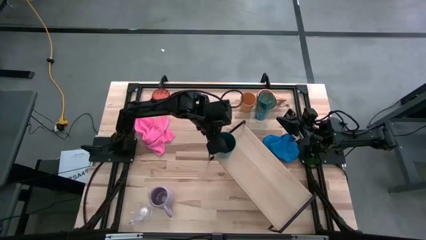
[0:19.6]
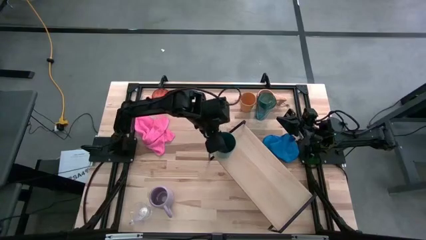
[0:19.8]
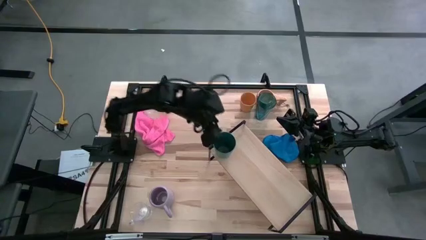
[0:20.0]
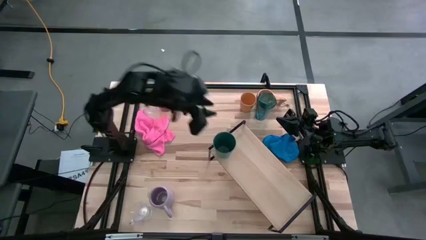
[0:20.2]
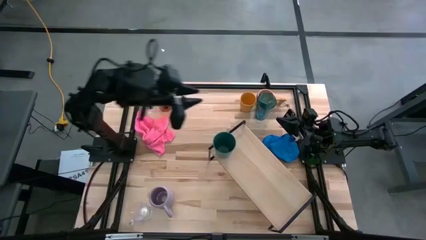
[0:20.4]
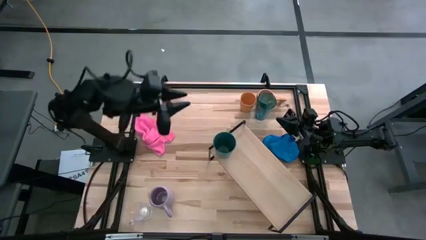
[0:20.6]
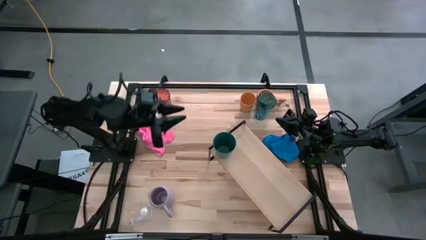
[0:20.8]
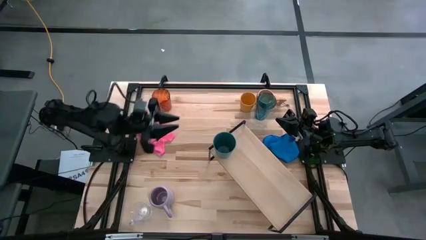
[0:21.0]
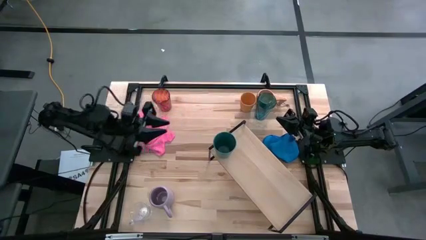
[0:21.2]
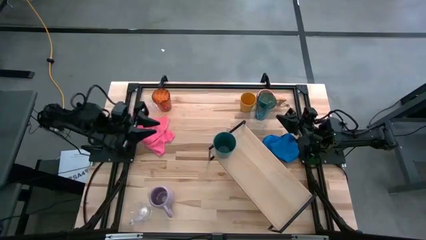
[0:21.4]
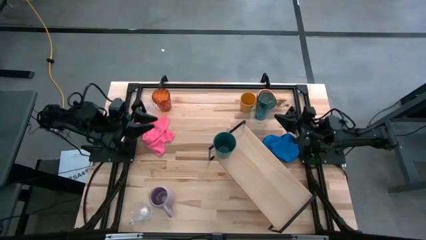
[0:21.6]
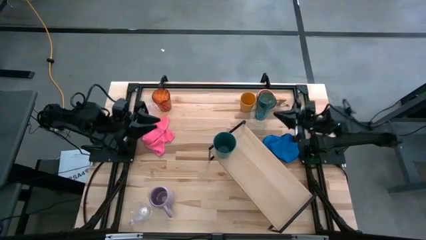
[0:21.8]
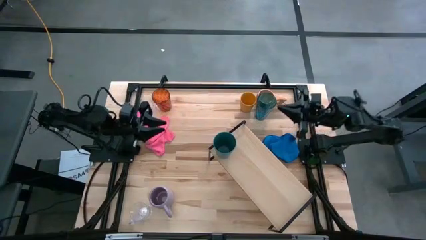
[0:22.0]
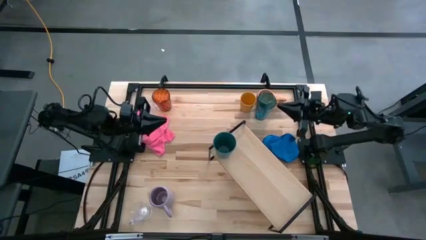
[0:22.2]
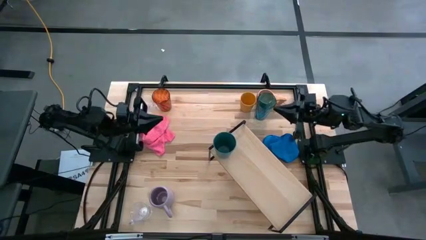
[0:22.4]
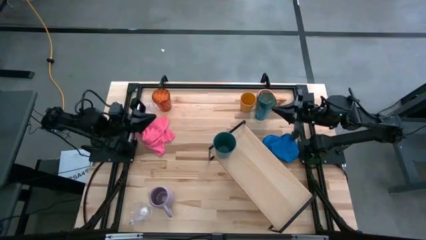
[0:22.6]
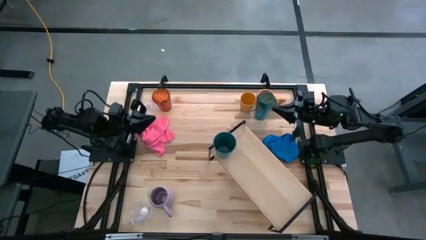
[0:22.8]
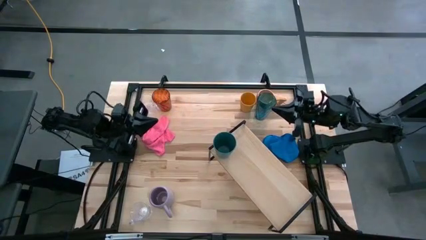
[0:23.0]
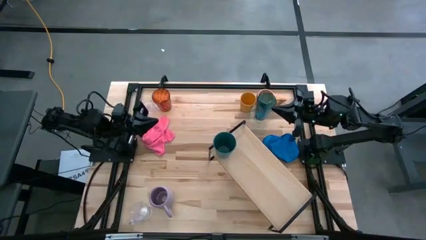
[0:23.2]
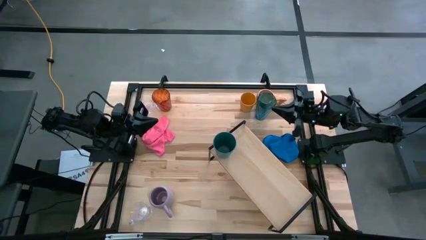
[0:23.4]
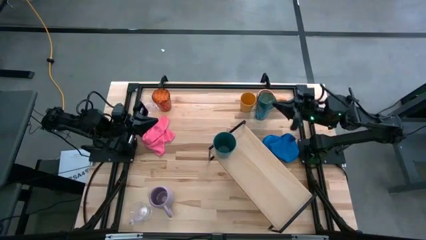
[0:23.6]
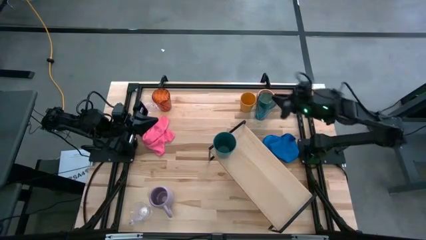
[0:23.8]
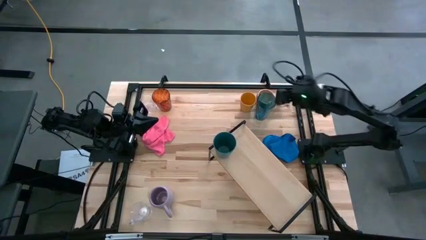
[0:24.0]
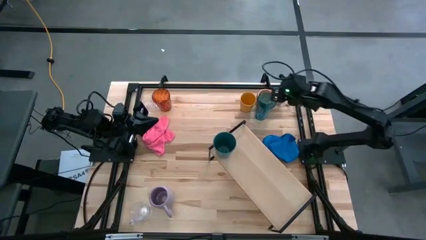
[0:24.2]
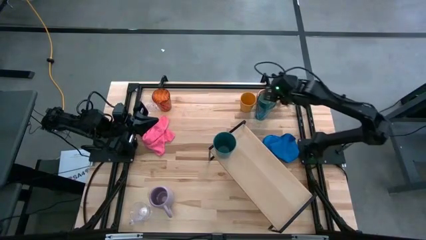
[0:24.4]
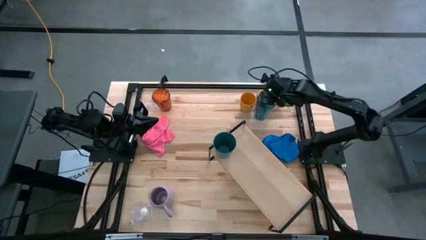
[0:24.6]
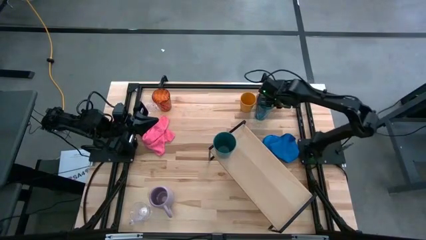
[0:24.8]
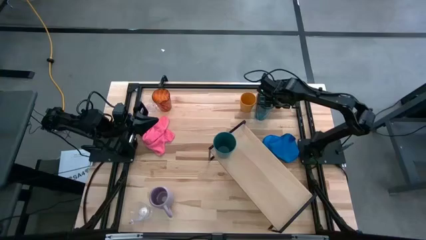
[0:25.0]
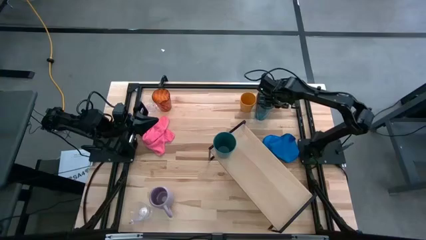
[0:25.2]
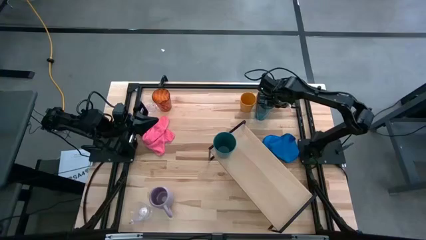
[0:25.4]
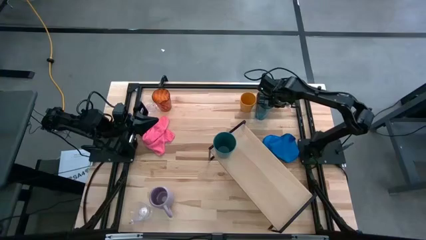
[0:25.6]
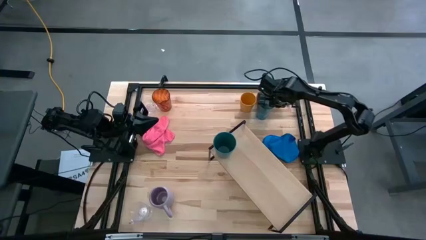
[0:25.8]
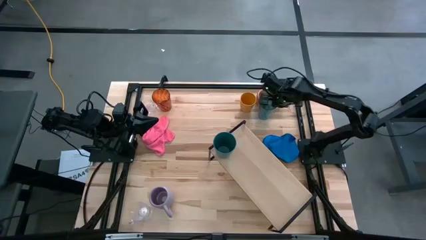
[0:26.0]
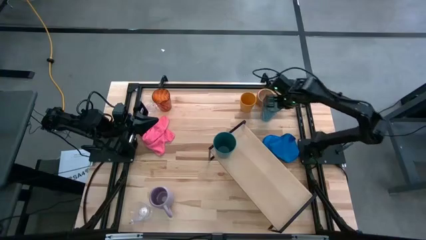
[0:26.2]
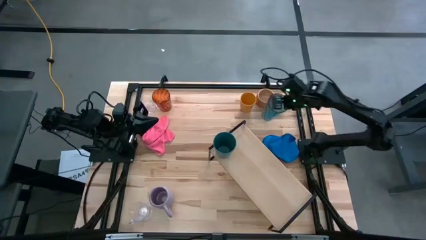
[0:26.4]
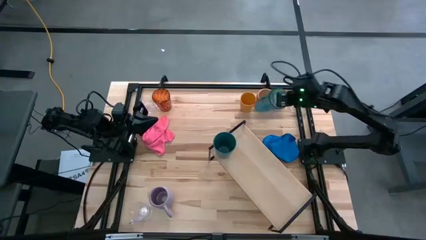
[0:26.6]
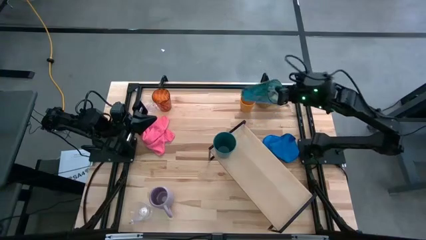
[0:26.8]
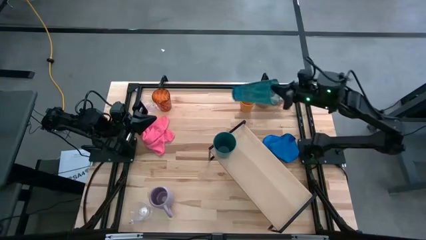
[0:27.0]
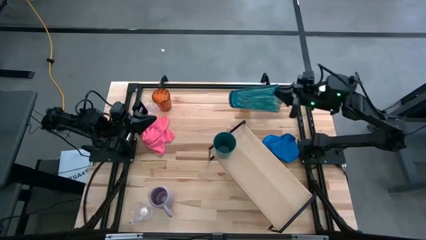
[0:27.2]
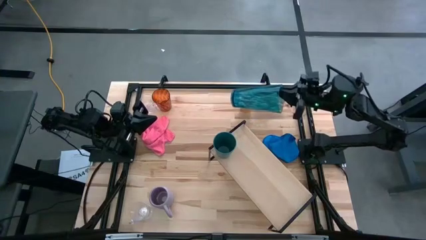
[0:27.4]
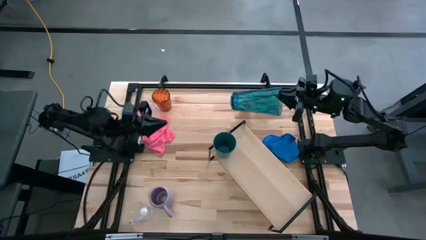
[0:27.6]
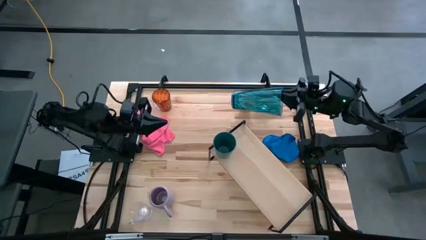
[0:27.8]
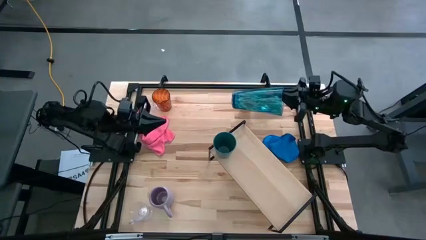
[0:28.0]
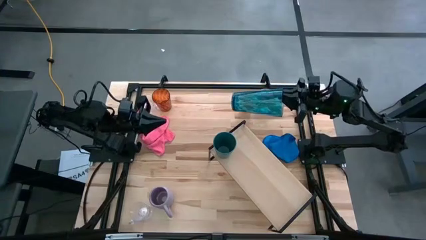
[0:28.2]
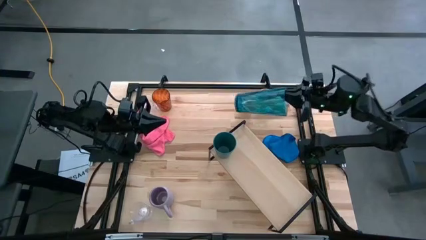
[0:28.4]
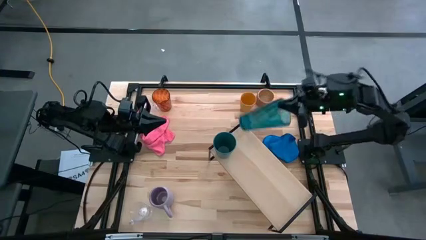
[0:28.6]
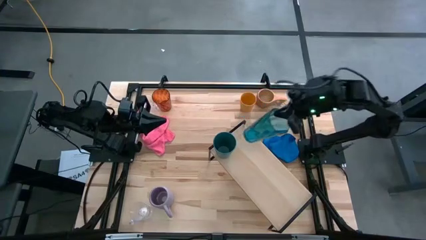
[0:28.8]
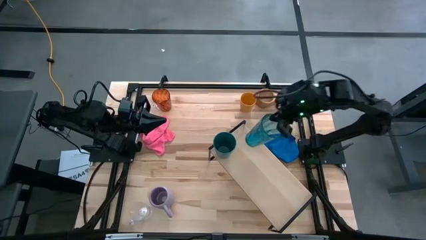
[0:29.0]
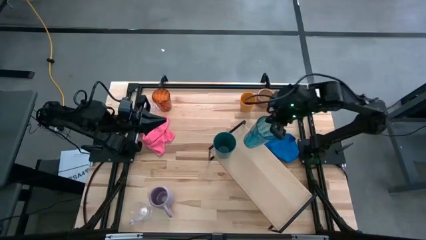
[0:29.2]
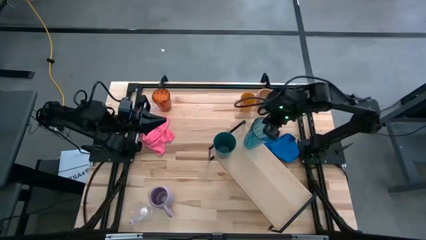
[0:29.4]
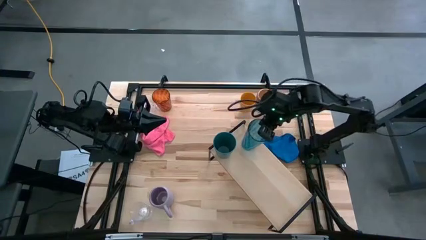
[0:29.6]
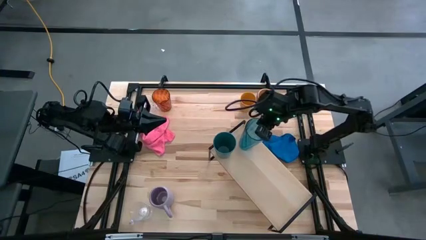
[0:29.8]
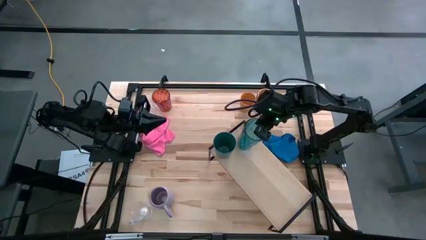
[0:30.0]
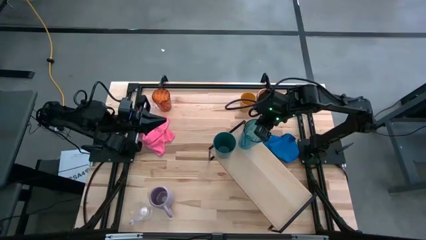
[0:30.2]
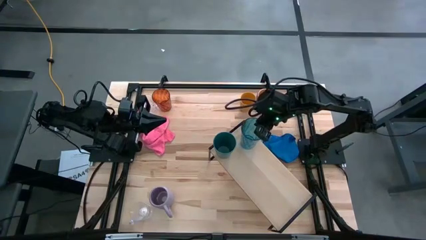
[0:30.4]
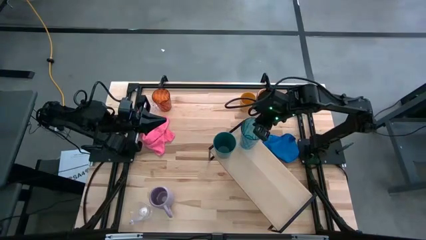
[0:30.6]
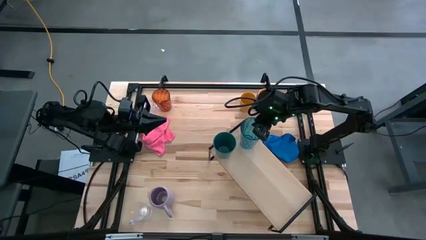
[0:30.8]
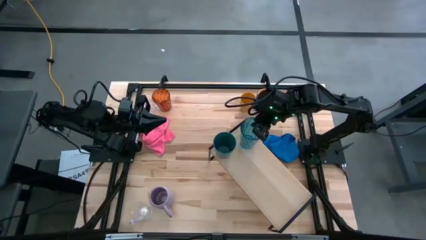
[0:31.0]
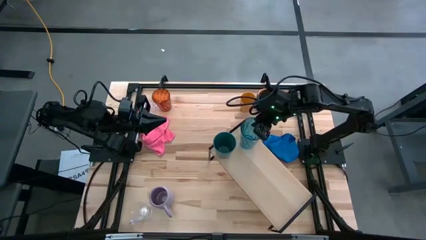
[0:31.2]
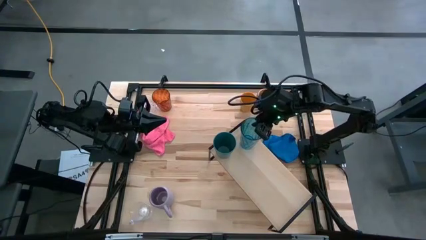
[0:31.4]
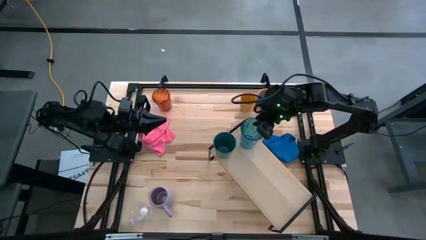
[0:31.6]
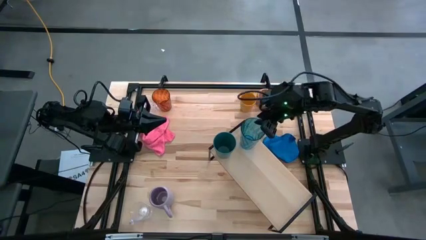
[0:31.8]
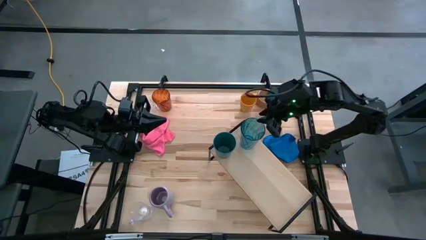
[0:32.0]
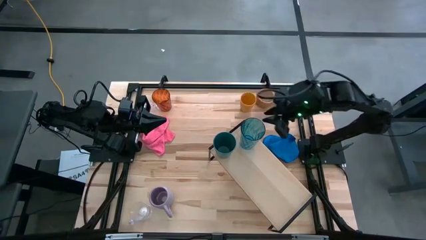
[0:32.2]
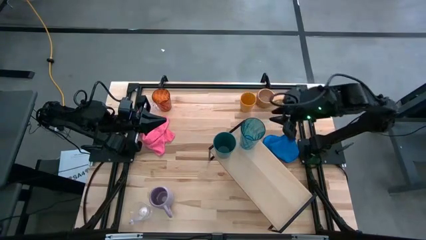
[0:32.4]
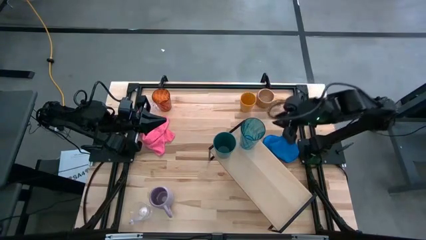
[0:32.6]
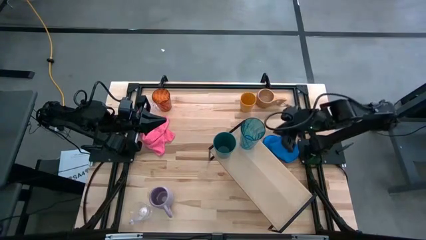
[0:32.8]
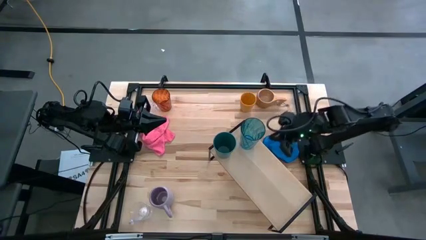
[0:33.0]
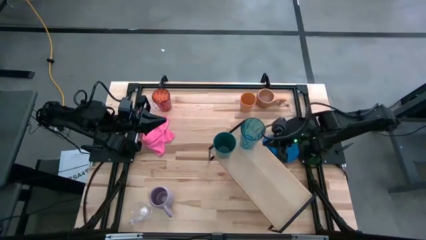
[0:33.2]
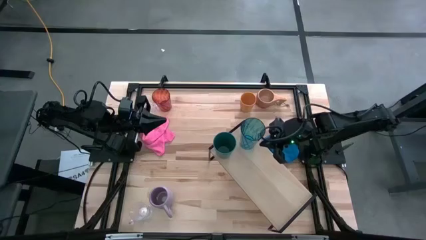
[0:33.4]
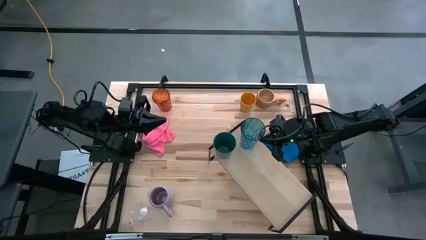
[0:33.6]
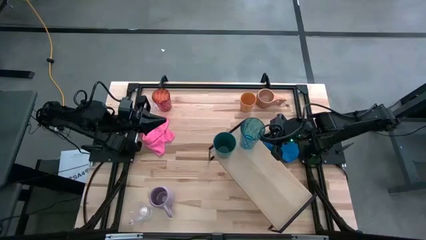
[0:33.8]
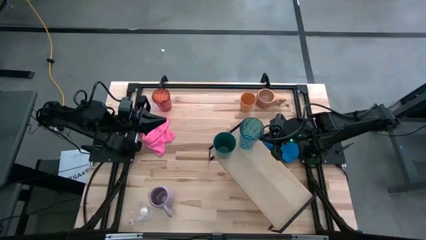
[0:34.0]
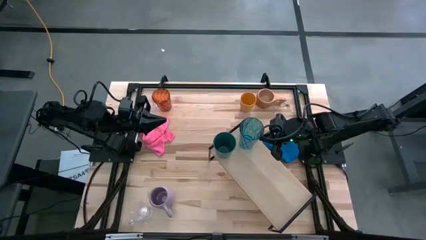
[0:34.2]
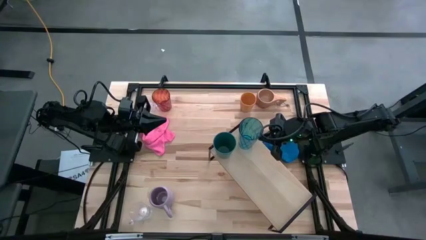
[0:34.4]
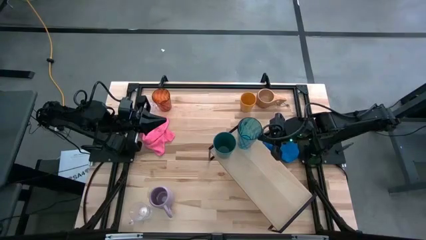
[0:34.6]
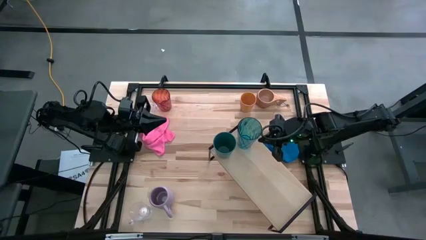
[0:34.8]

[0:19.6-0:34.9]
Task: Stack small to large cups/mugs on shelf
Put the blue cup on the shelf
